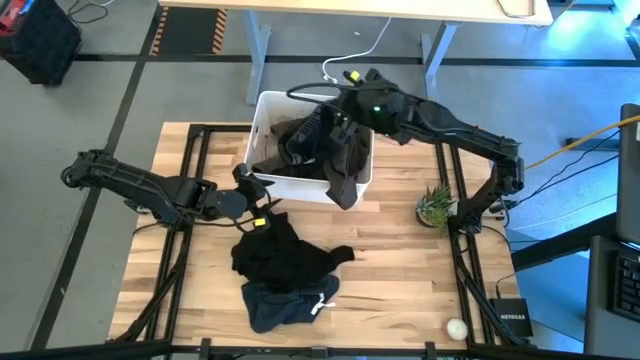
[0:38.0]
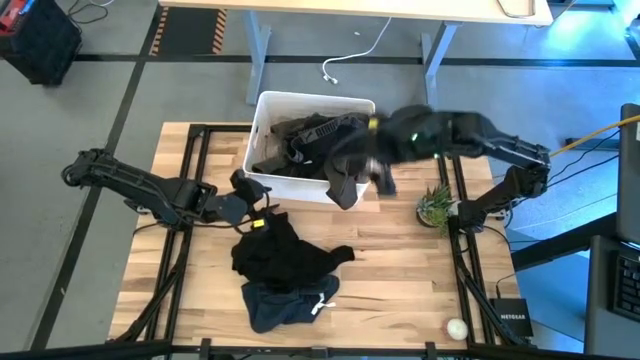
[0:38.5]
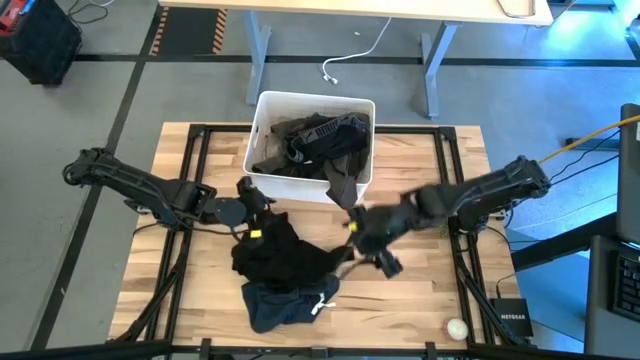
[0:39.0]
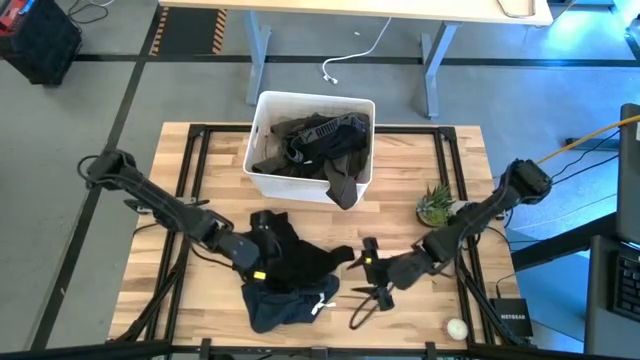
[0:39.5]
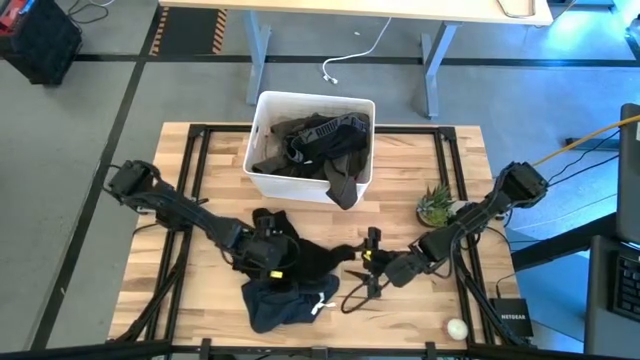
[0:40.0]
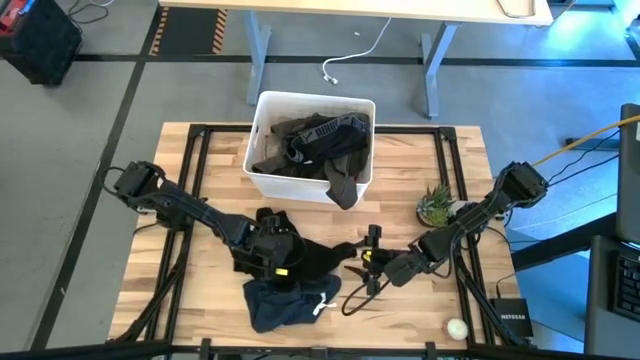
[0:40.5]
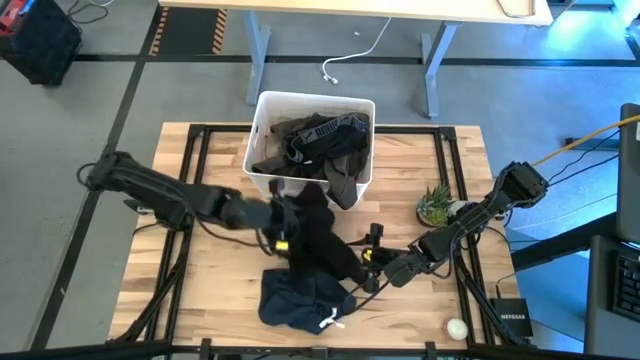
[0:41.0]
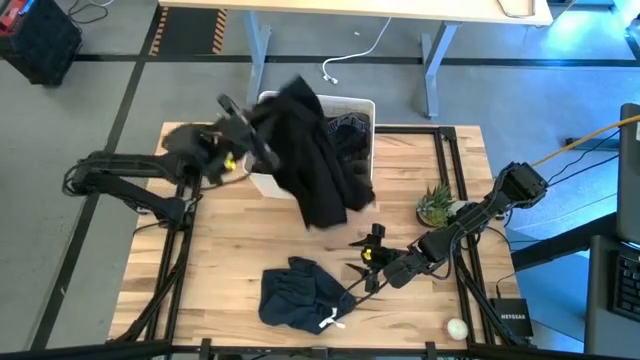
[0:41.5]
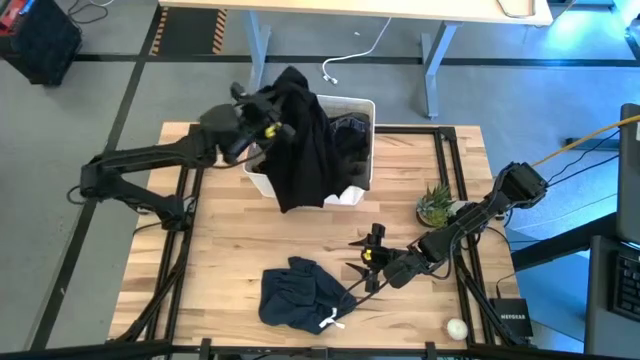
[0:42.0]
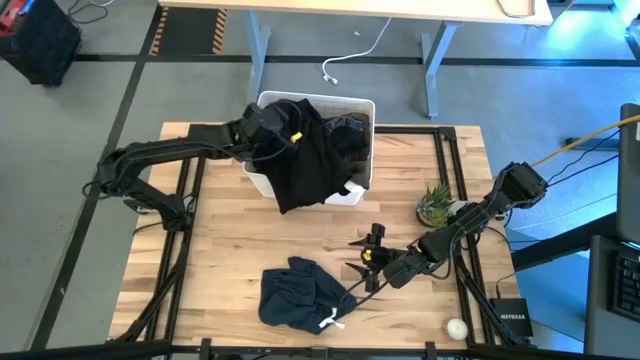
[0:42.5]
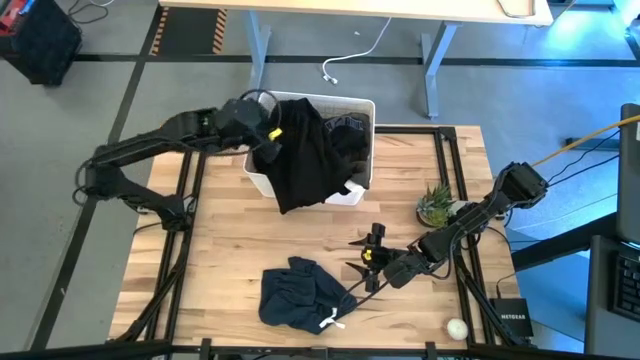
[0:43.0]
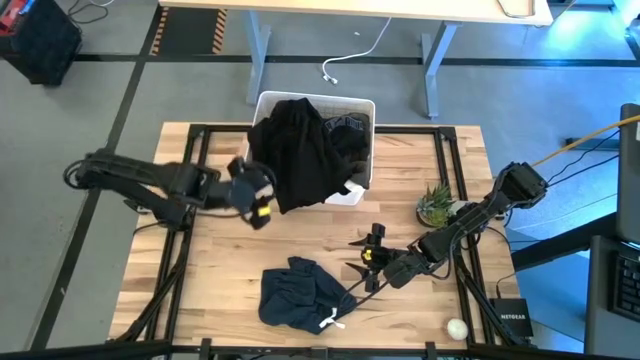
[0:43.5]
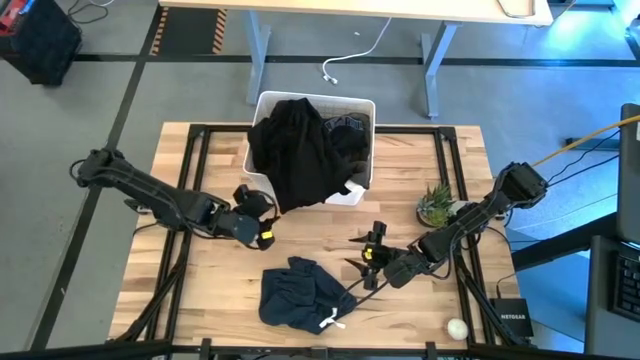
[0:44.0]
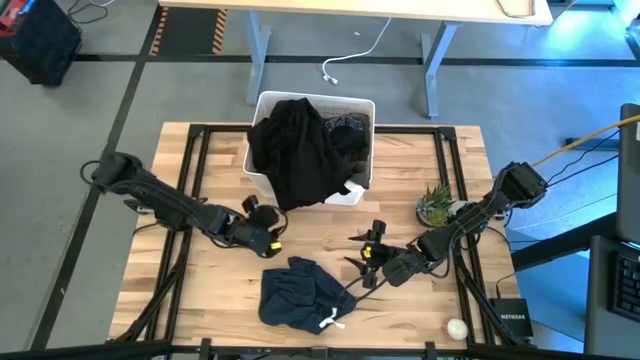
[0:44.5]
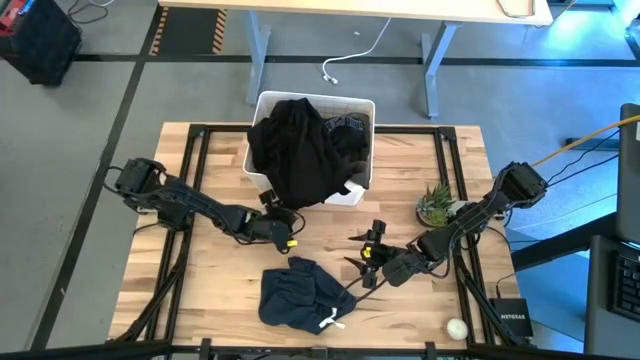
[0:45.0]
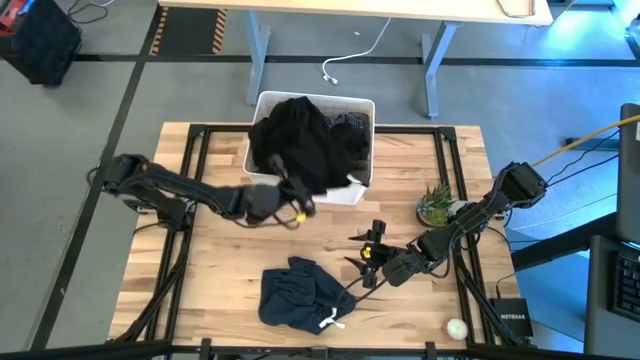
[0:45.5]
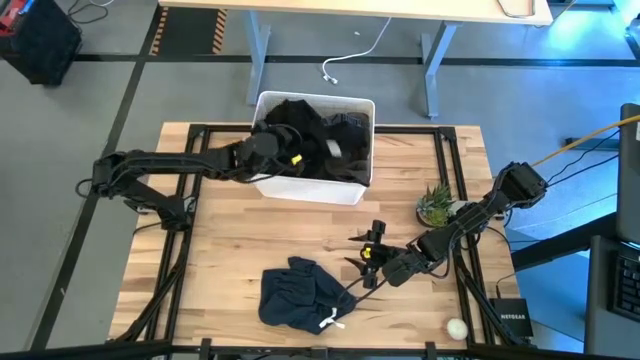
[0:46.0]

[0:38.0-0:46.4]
Task: Sort clothes
Put the black shirt into the white bin

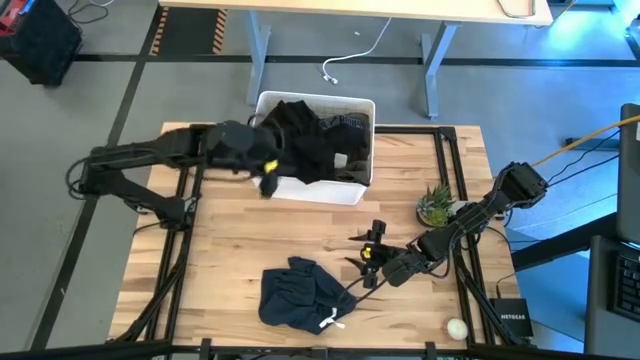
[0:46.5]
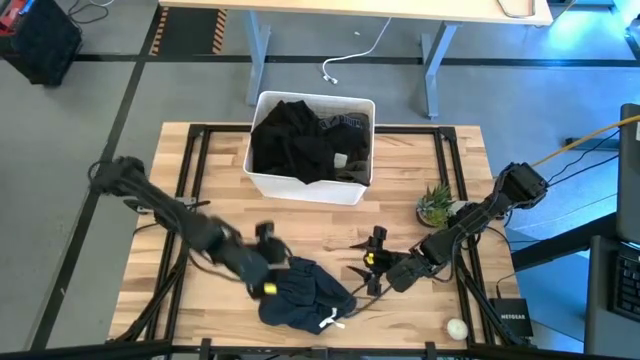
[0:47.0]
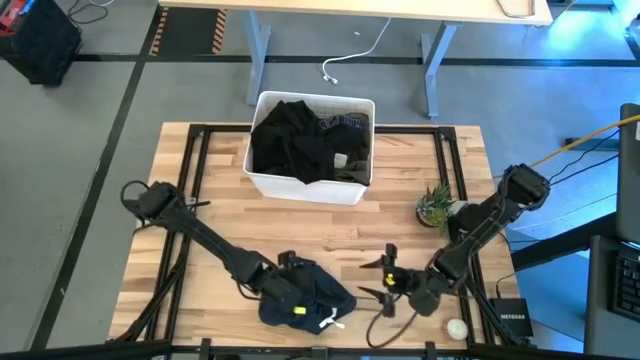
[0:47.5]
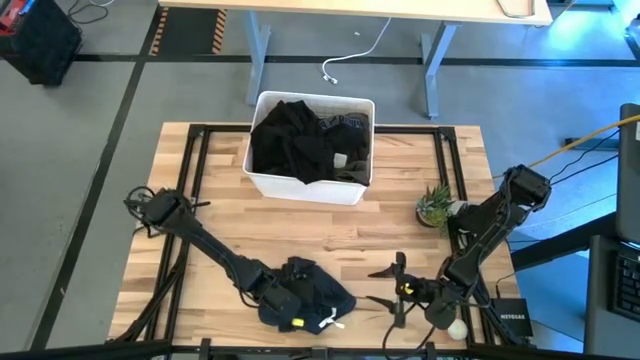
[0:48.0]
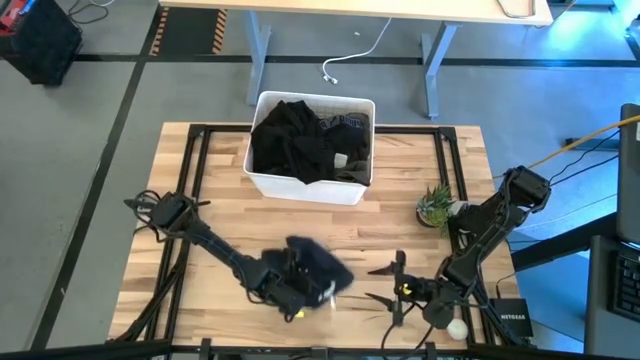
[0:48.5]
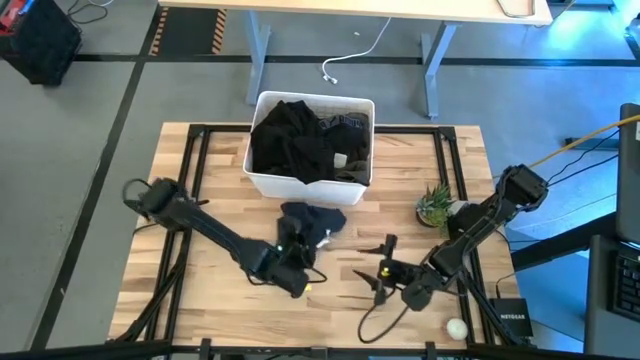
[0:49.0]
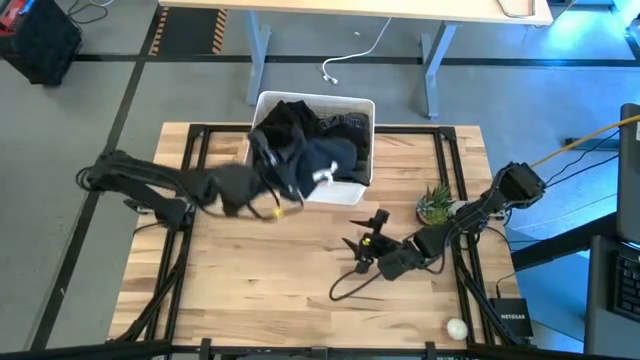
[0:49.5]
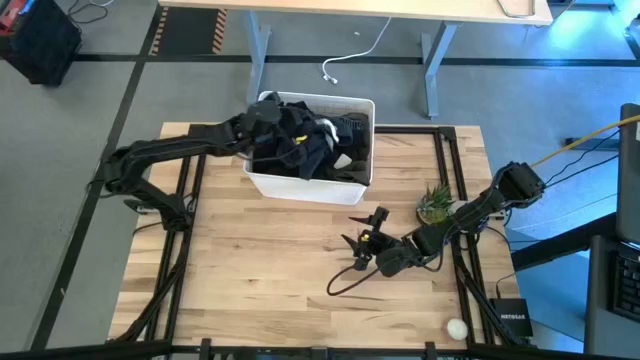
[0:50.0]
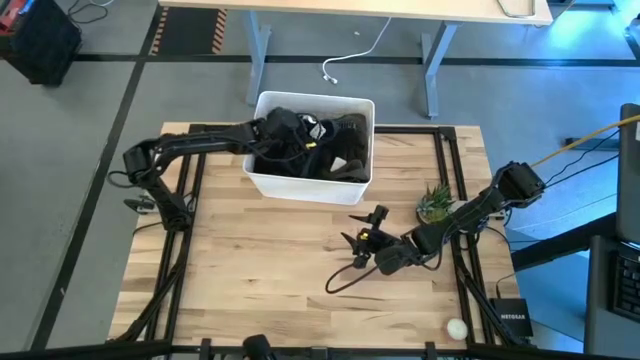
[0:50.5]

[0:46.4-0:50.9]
Put the blue short into the white bin

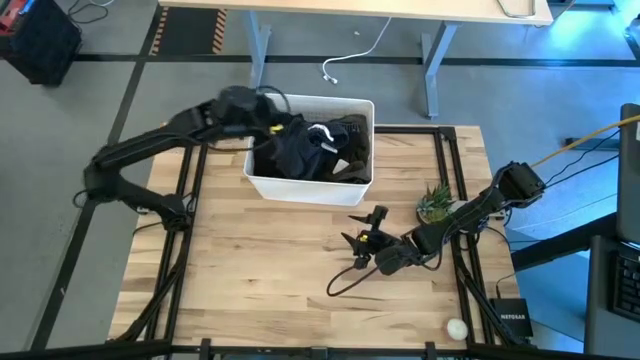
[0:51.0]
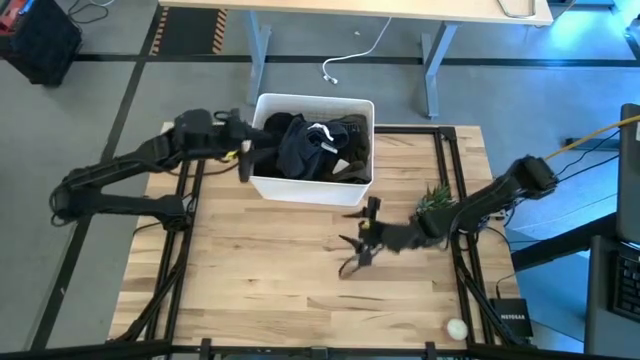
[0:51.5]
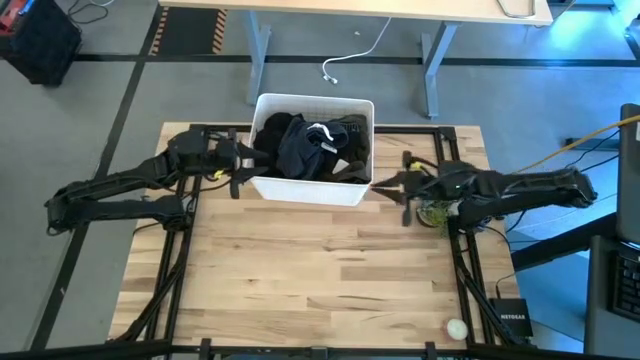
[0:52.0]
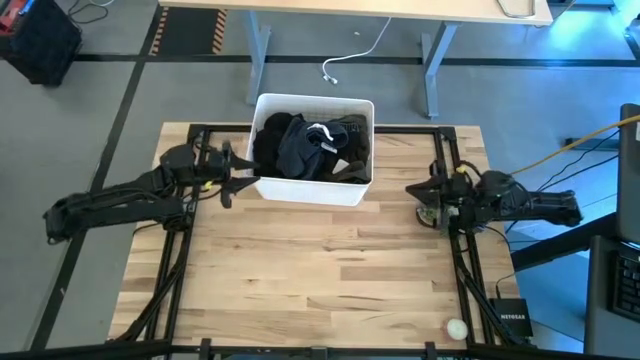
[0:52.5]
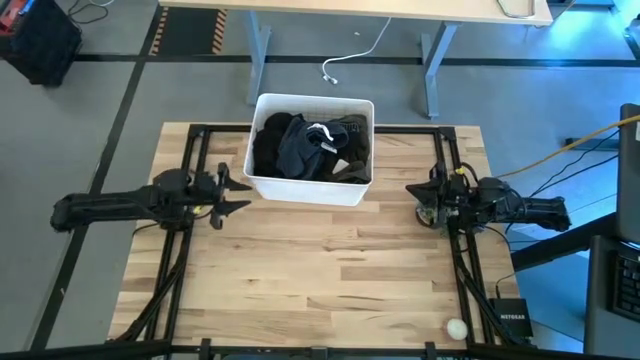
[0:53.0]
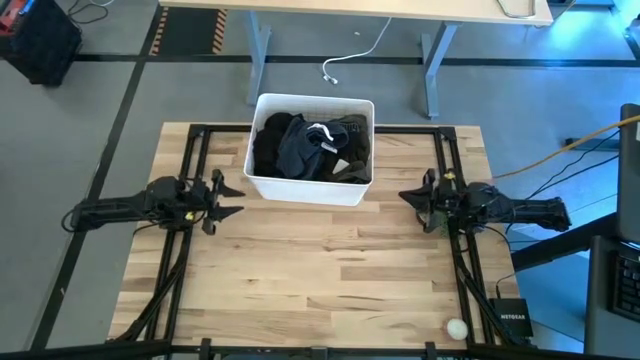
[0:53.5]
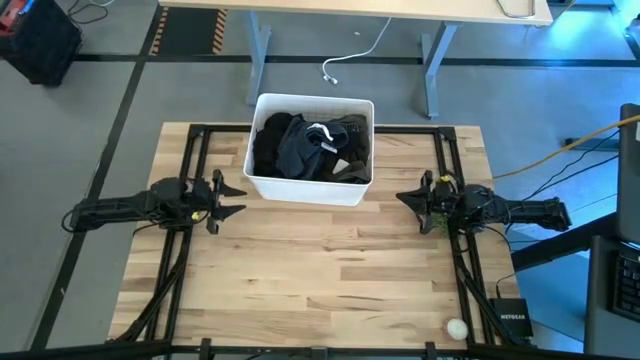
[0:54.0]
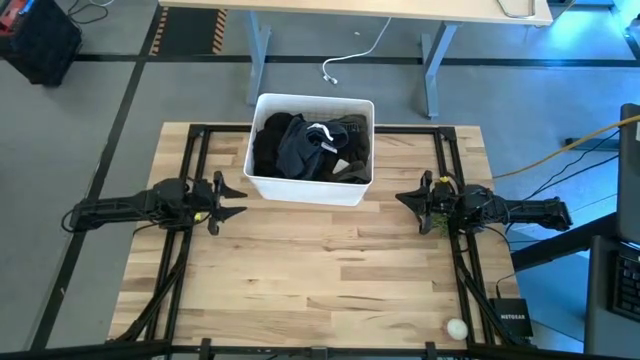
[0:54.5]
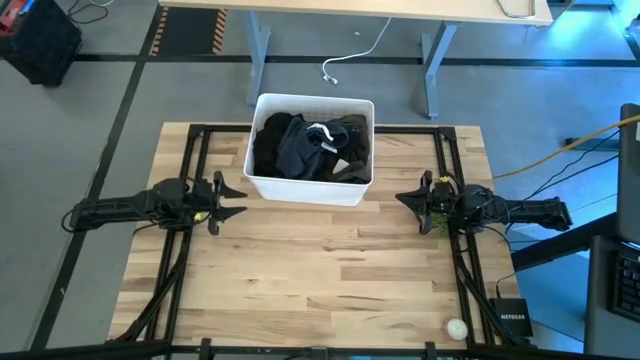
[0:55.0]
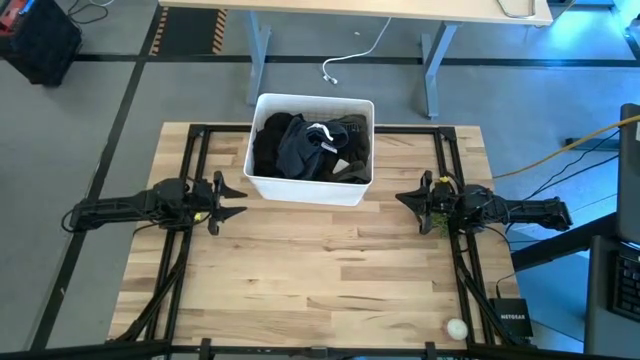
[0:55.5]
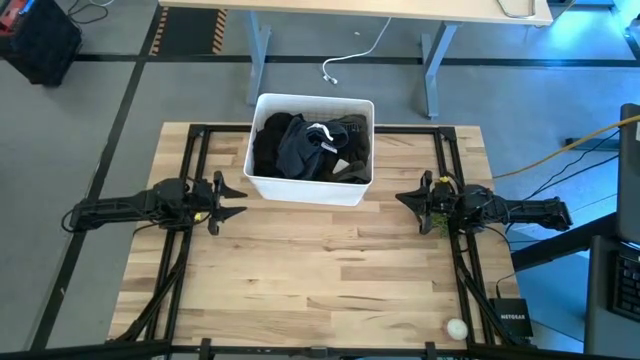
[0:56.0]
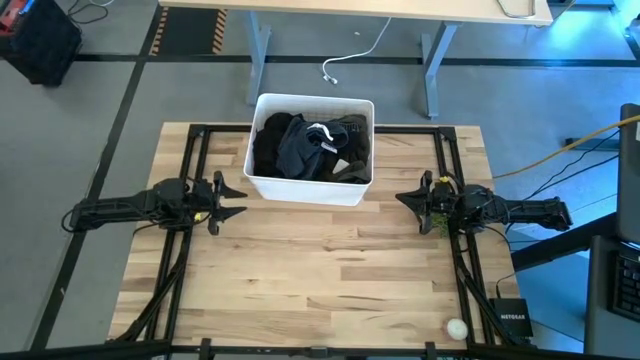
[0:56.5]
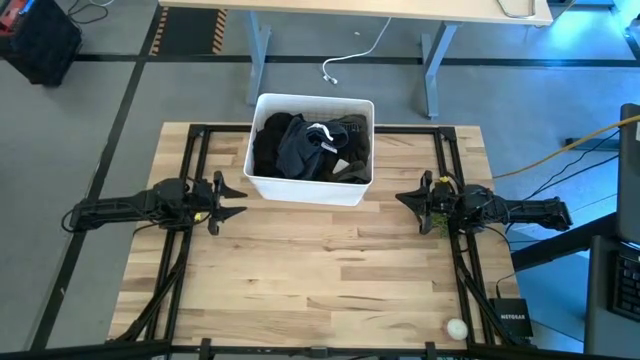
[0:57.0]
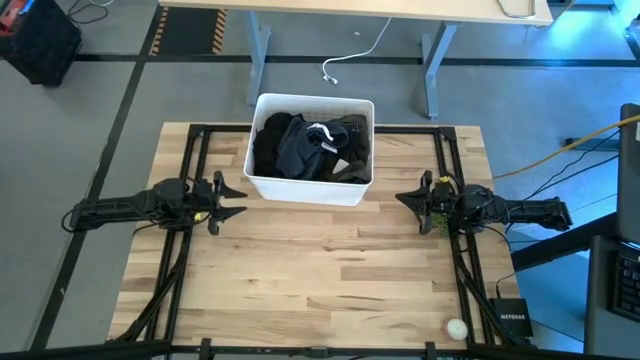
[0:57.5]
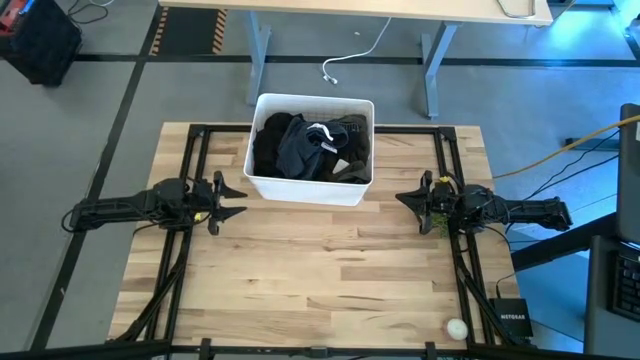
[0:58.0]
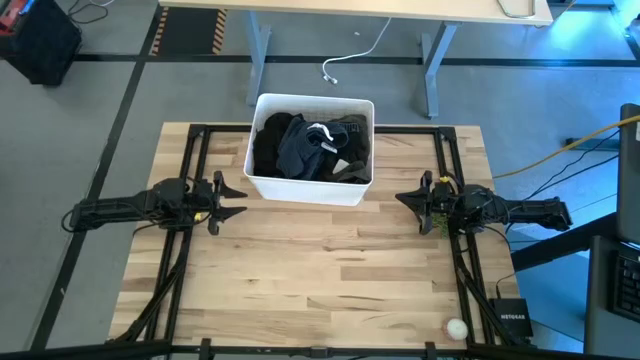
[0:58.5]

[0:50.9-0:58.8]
Return to Home Position
